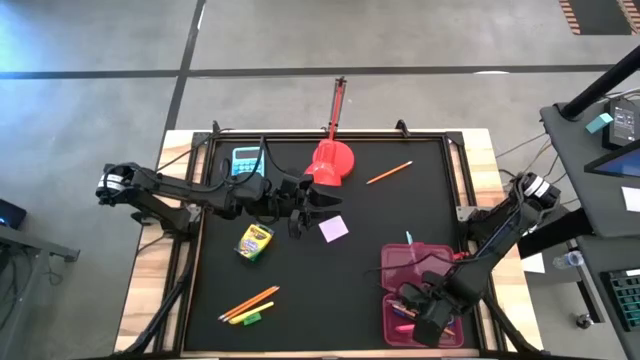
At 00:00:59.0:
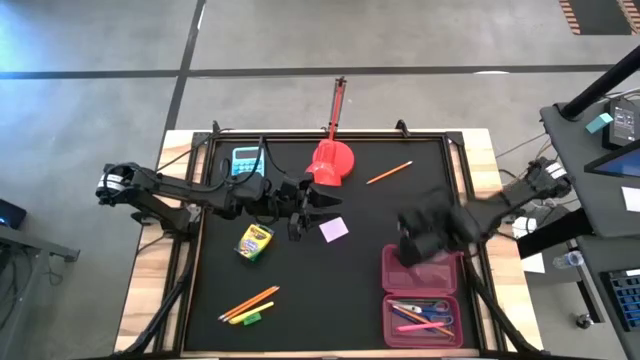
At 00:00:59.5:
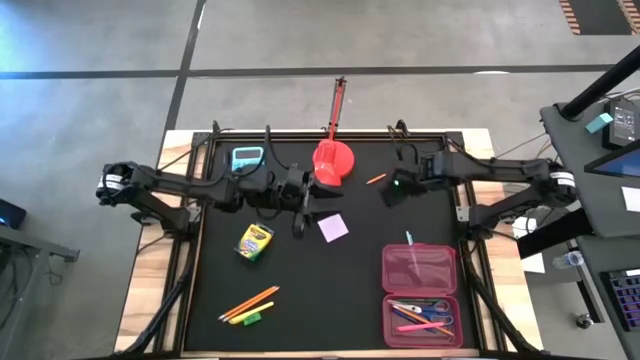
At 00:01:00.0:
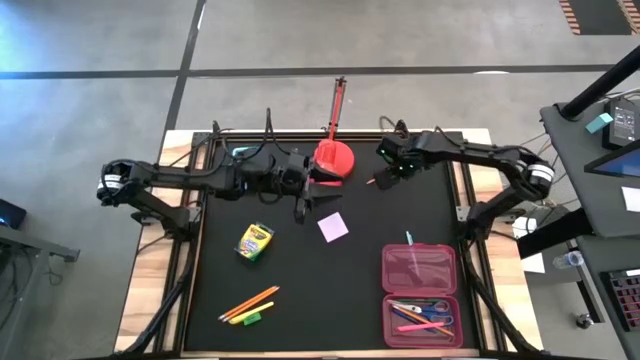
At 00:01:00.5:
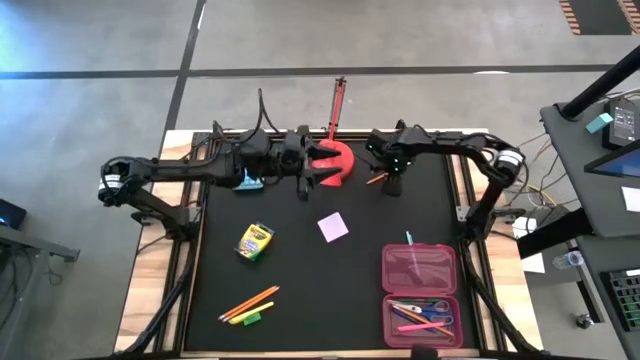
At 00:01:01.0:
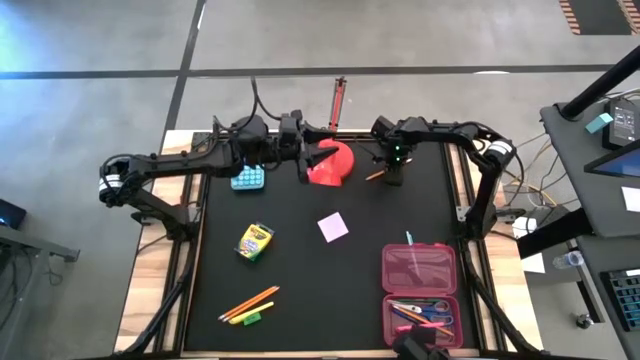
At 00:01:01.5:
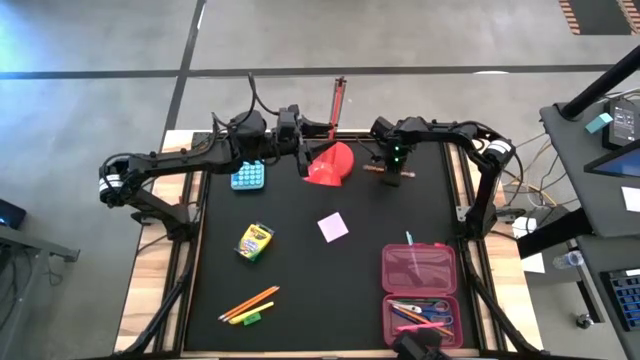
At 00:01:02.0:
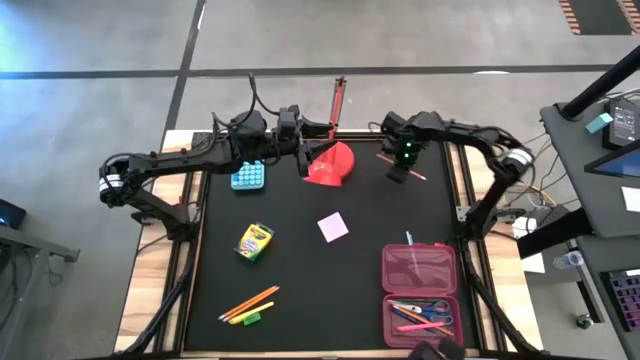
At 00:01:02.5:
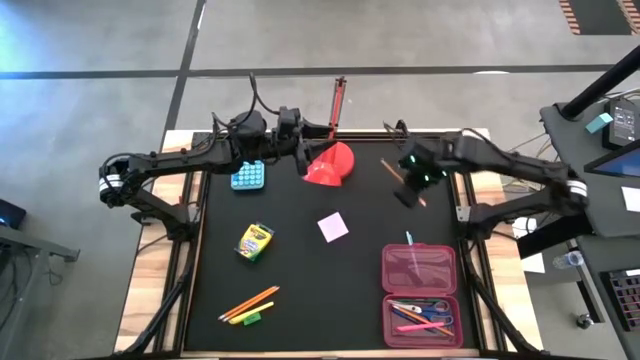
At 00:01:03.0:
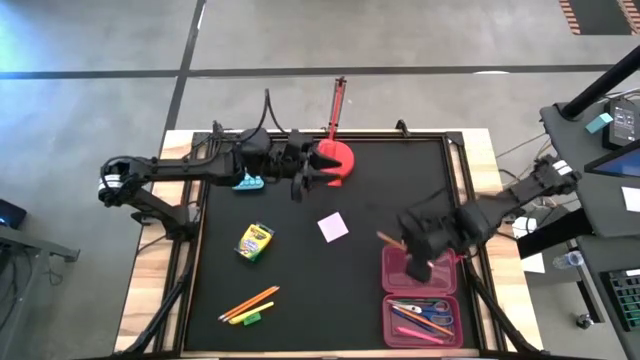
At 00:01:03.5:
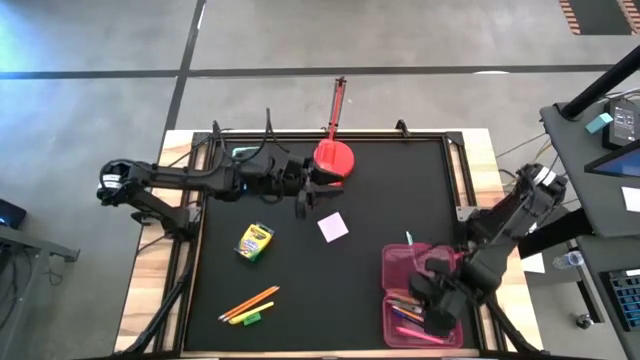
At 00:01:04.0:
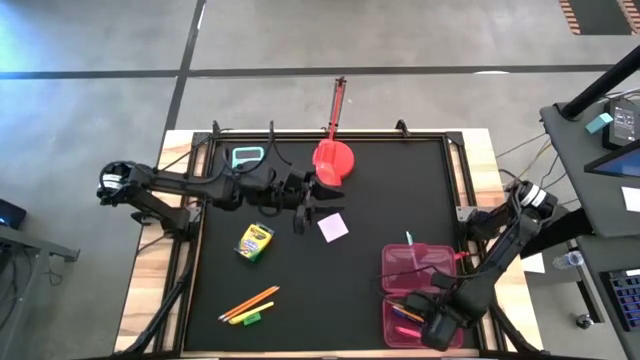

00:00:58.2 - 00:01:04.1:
Task: Pack school essentials
Put the orange pencil into the pink supply box

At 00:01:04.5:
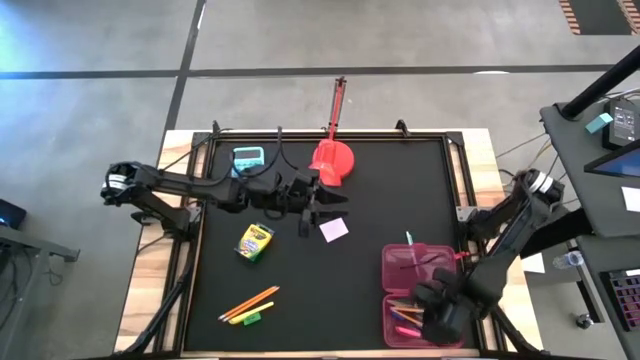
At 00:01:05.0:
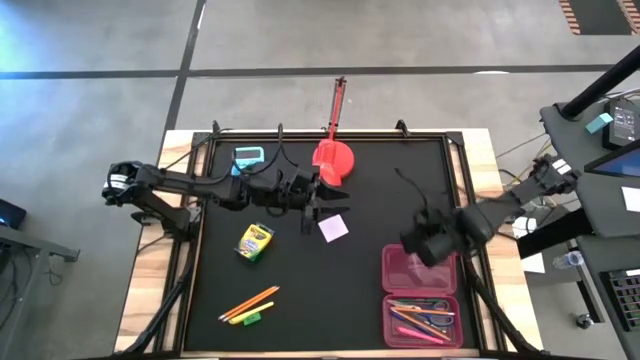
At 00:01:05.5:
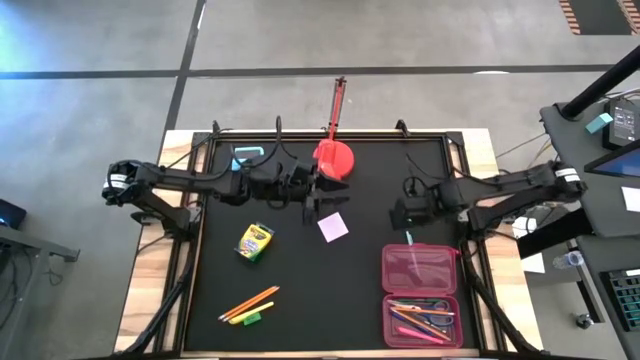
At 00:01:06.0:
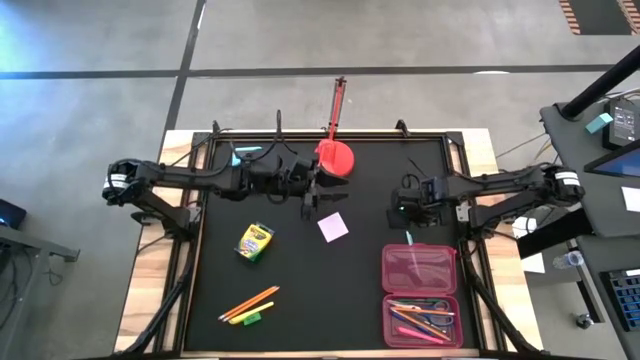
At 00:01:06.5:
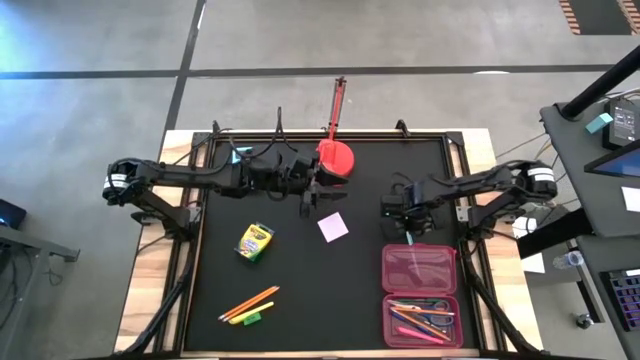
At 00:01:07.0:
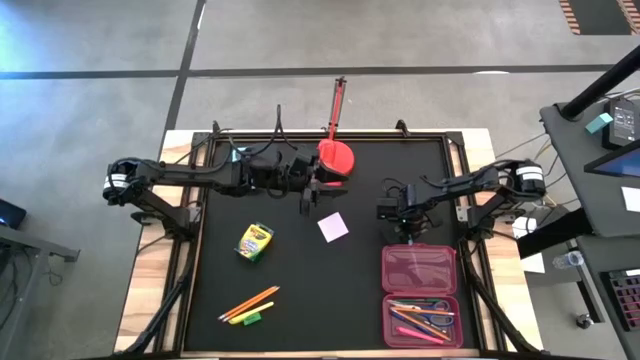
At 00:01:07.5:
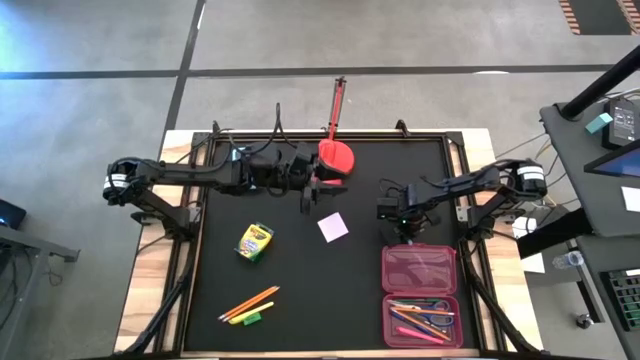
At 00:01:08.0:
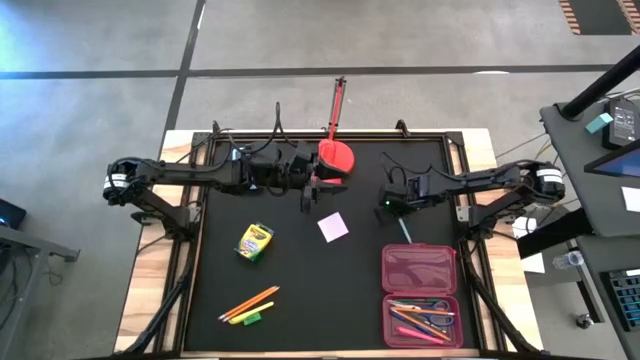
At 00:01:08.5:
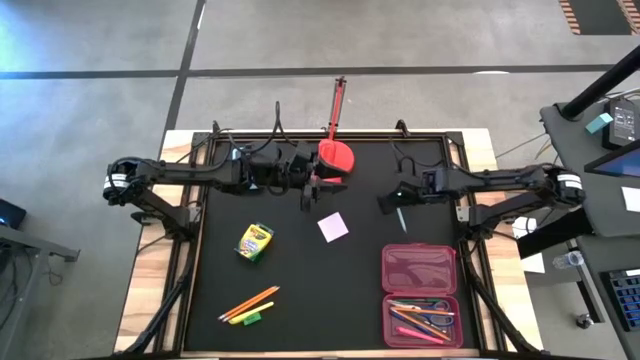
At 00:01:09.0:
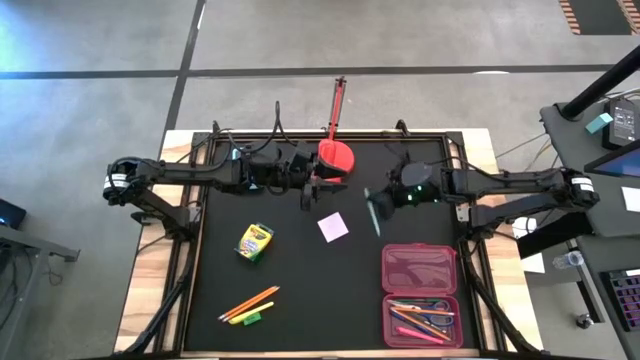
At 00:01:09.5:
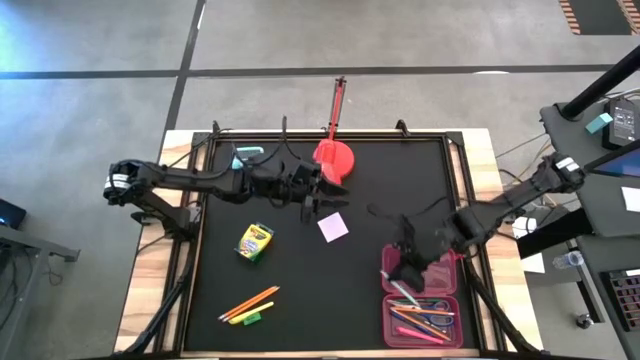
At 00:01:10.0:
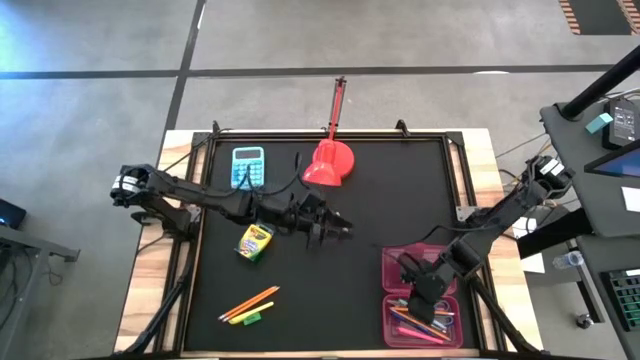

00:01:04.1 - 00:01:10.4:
Put the light blue pen into the pink supply box

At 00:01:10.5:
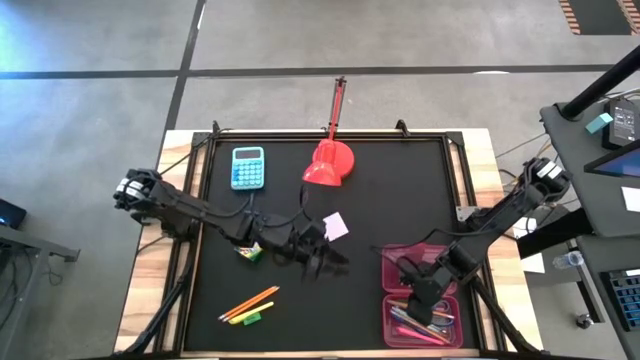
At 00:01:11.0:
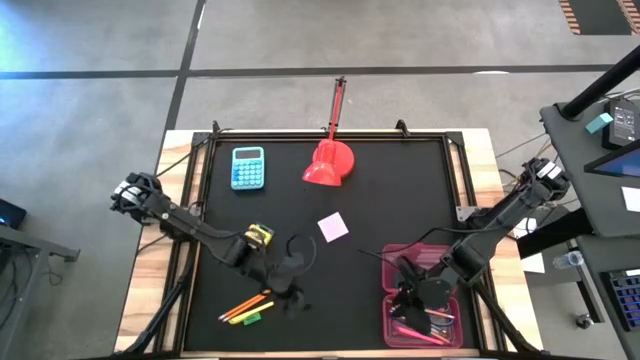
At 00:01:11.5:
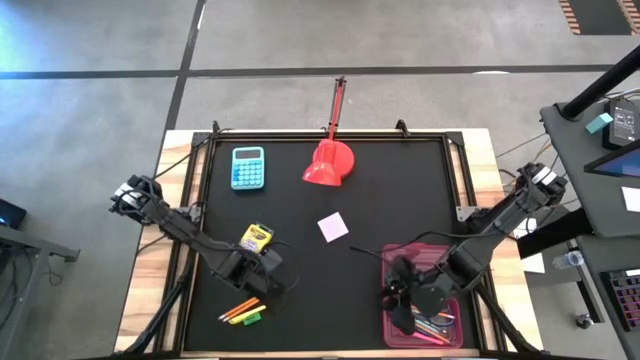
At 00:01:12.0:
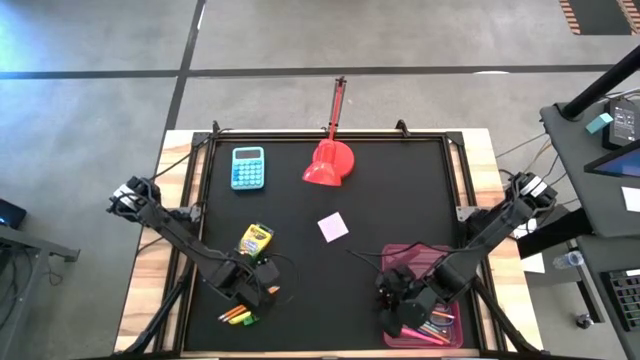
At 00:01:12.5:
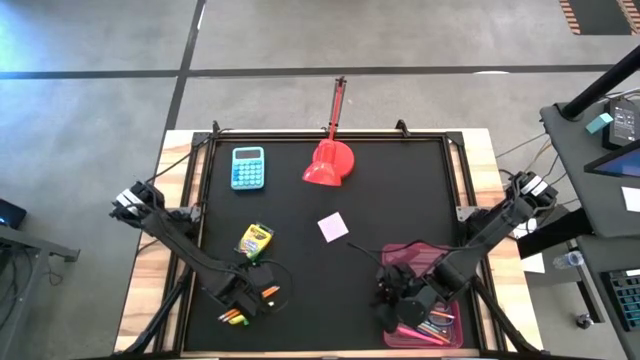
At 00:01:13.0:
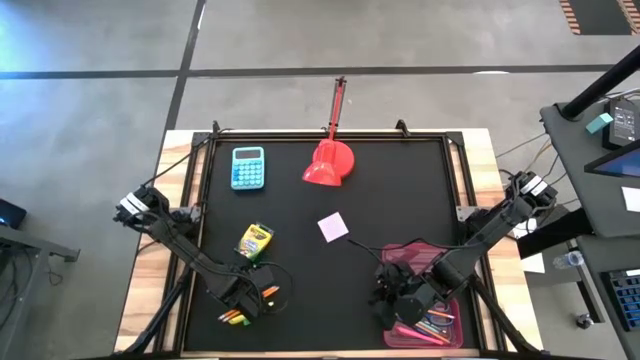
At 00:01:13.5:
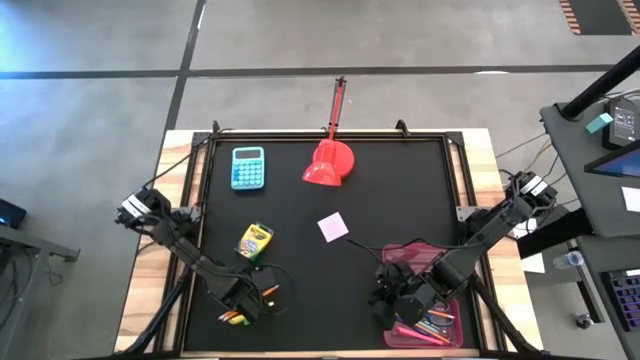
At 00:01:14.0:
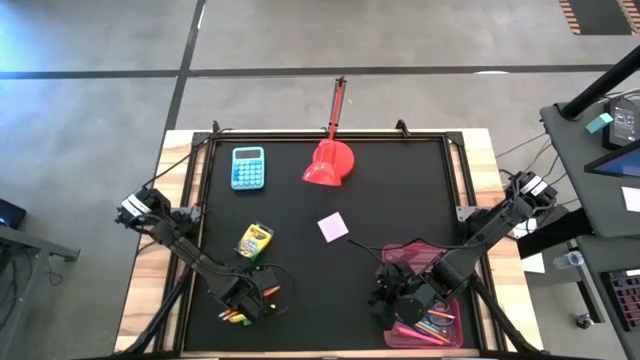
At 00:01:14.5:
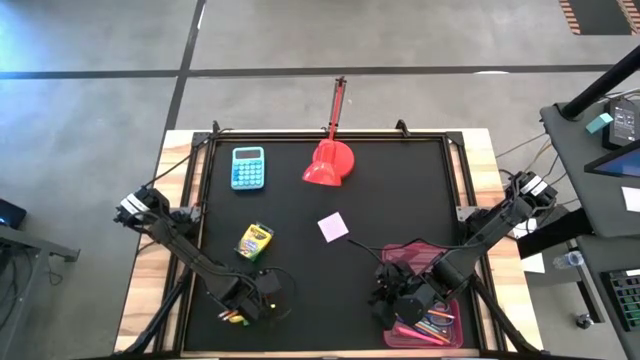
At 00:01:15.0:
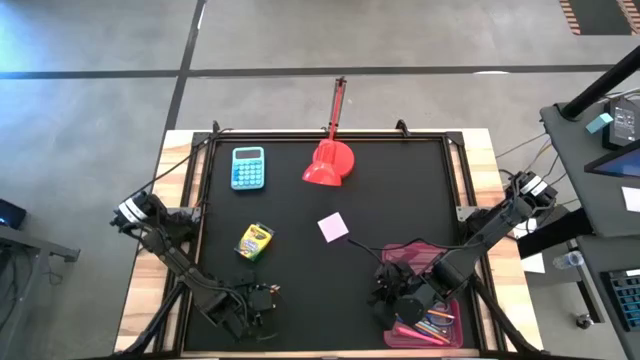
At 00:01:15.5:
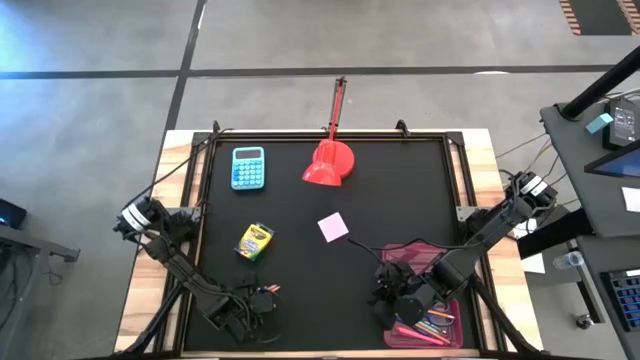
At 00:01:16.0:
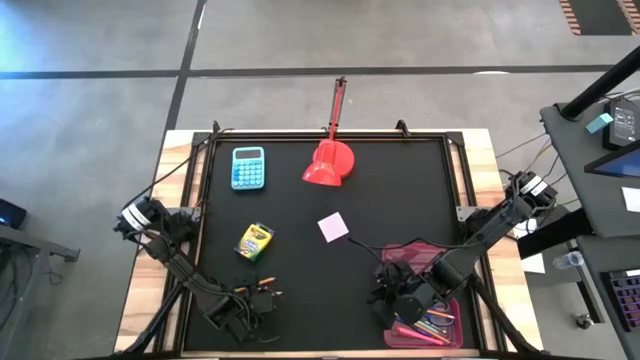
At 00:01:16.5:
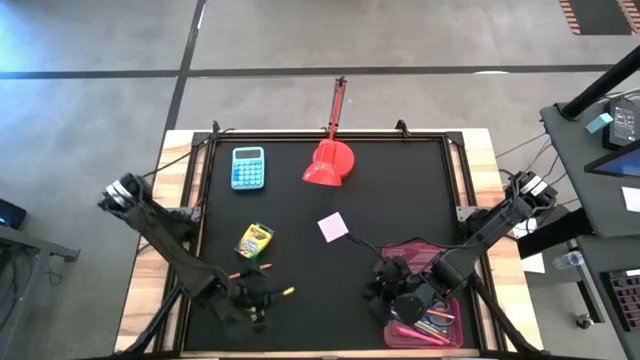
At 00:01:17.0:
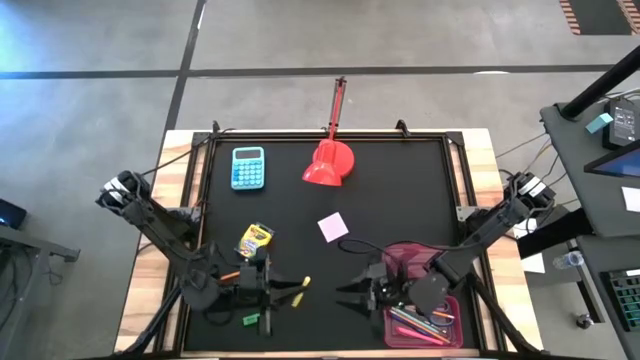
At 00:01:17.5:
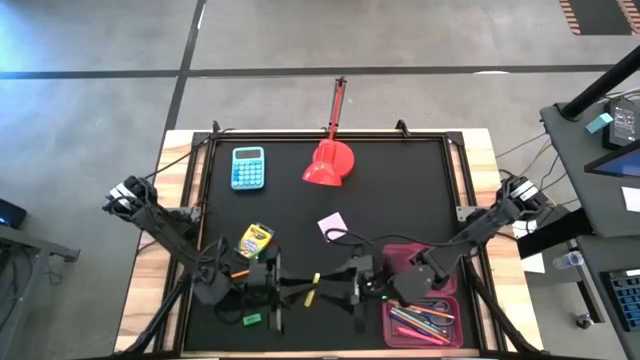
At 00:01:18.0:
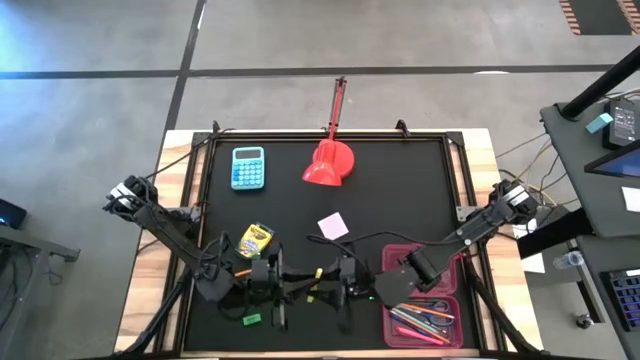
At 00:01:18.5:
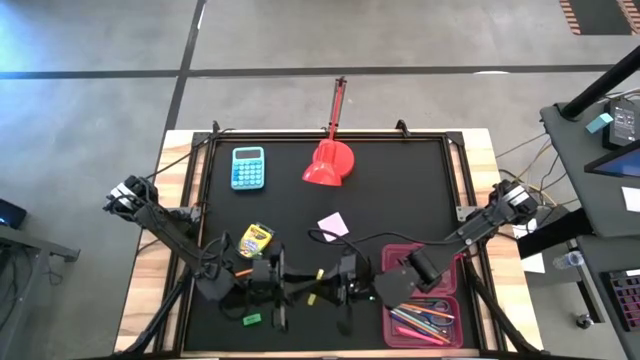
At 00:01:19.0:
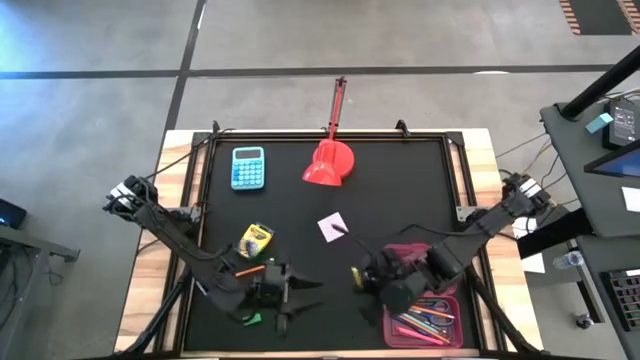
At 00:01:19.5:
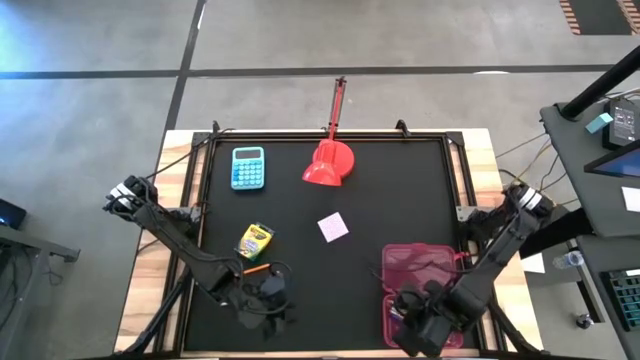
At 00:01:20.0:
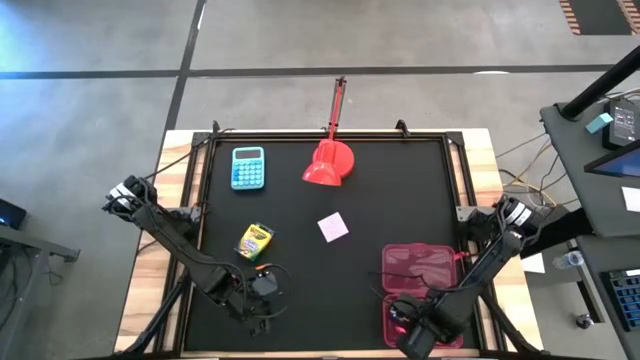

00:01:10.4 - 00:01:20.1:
Put the yellow pen into the pink supply box
